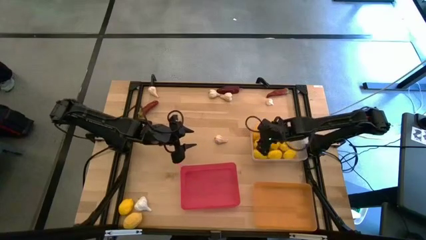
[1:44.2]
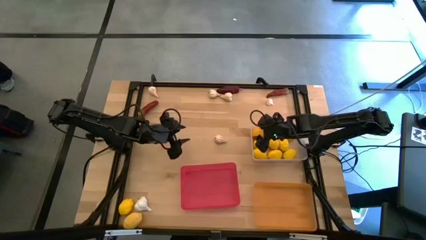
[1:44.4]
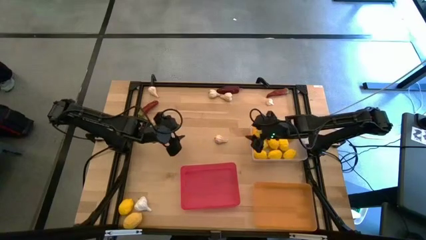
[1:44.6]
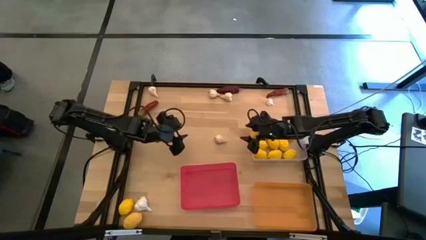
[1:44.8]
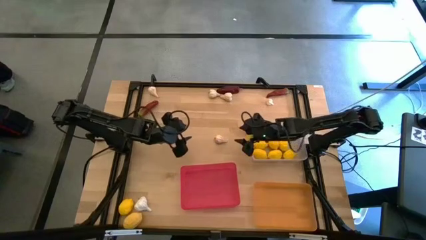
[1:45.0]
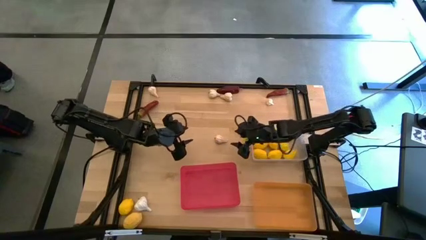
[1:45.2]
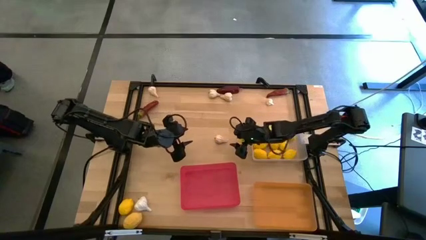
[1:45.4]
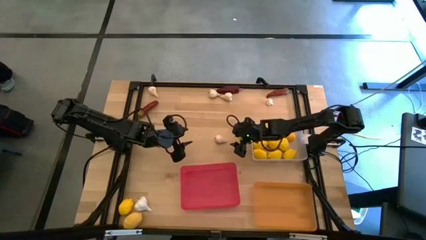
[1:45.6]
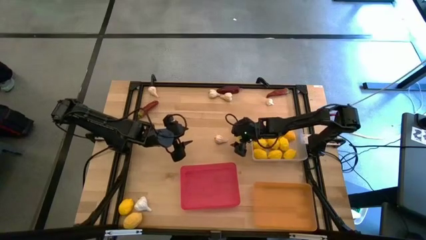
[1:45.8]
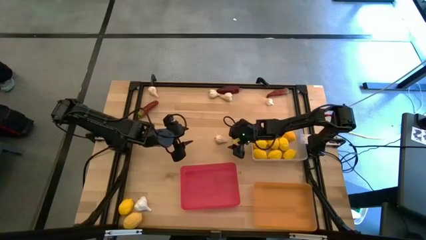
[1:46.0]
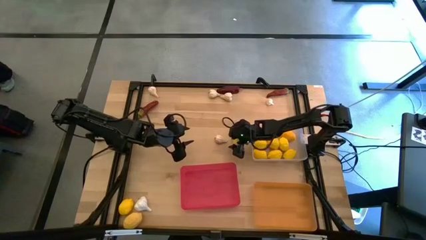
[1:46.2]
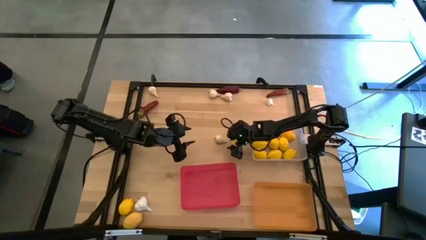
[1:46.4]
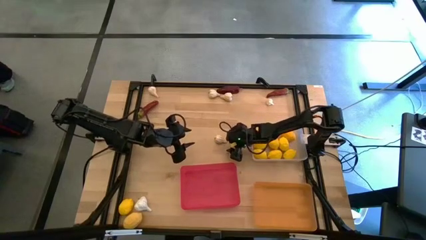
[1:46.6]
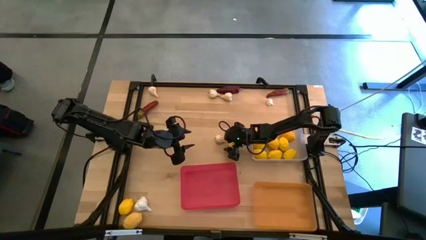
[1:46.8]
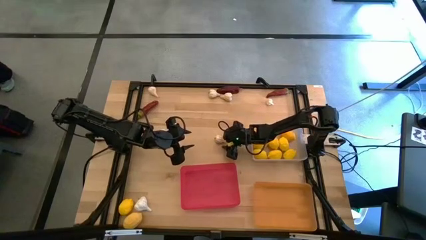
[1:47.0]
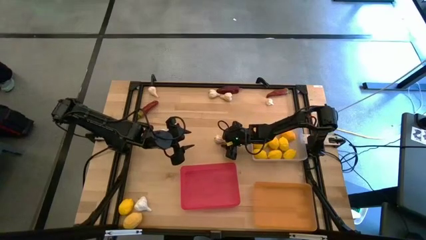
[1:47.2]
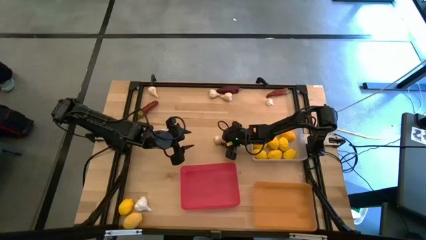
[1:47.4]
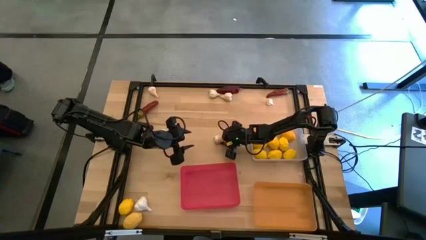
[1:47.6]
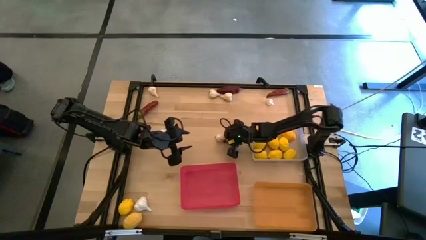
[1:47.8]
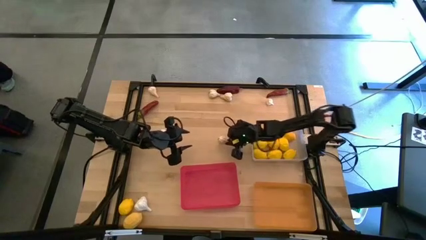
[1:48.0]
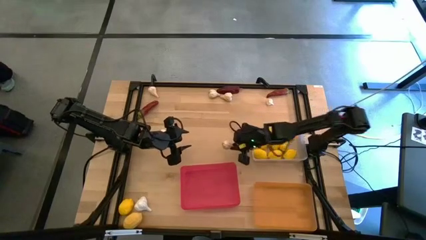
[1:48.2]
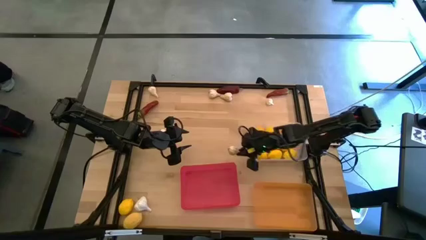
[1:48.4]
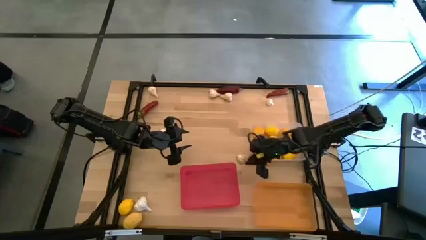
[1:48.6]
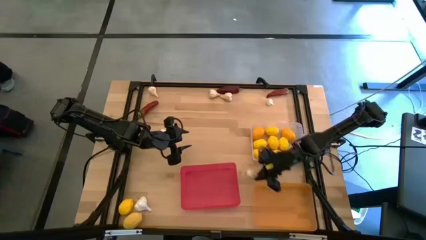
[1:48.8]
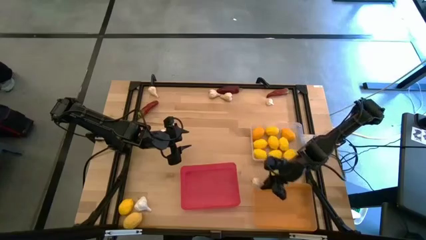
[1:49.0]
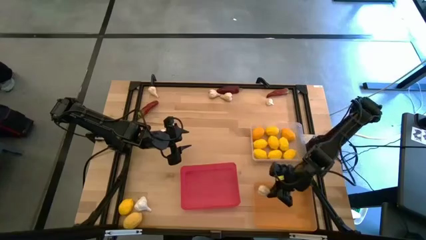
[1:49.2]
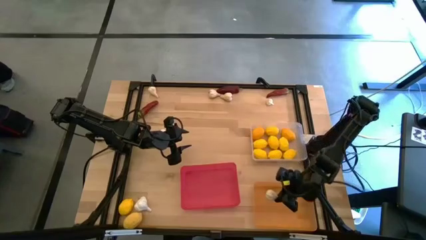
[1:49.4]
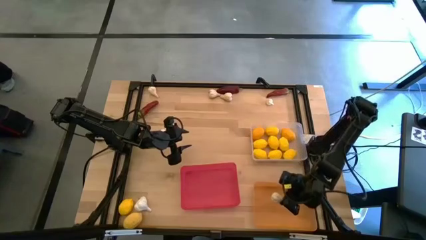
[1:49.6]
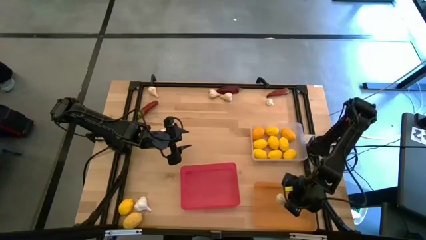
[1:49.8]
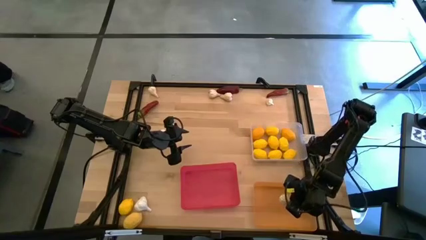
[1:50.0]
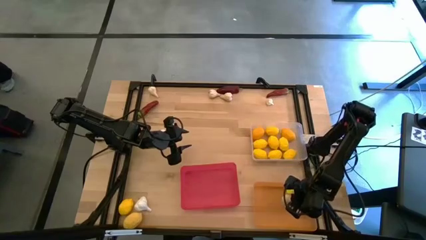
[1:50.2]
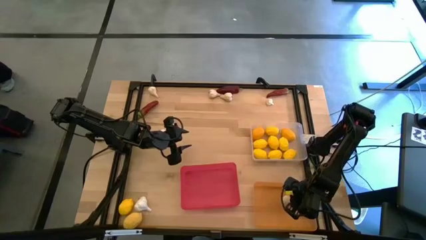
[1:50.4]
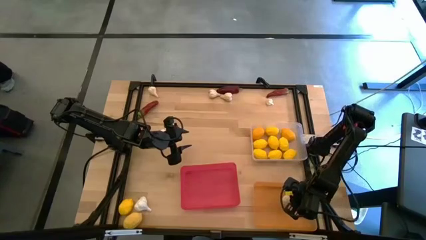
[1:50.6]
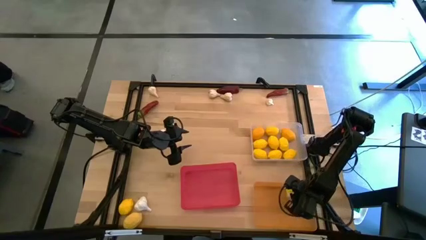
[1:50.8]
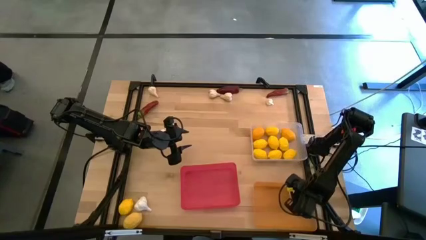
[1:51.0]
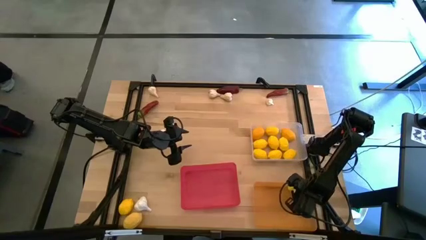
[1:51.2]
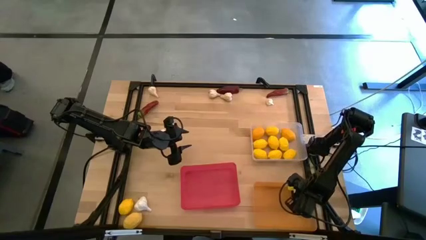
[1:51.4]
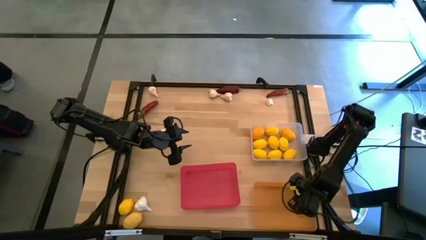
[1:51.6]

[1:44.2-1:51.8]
Task: Sort produce into baskets
Put the white garlic into the orange bin

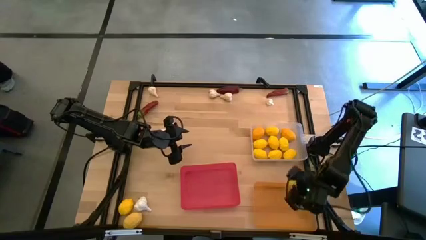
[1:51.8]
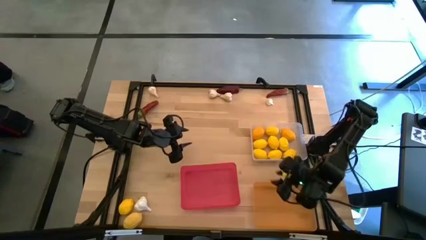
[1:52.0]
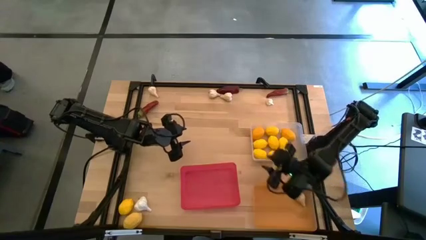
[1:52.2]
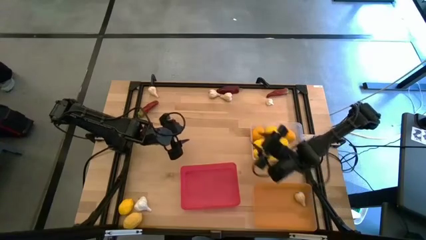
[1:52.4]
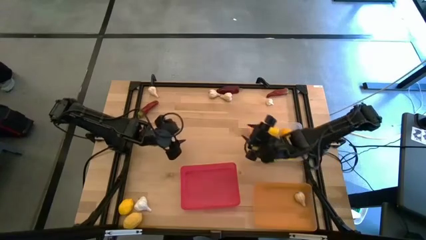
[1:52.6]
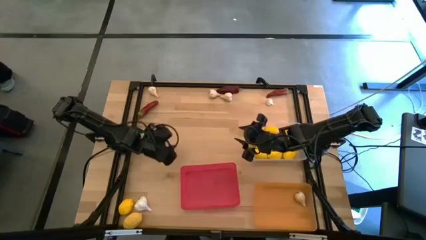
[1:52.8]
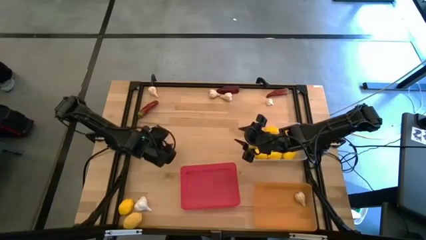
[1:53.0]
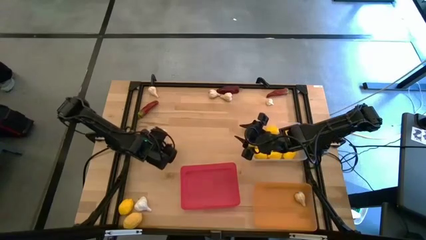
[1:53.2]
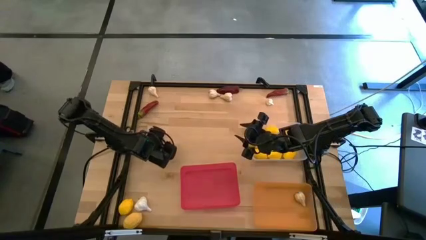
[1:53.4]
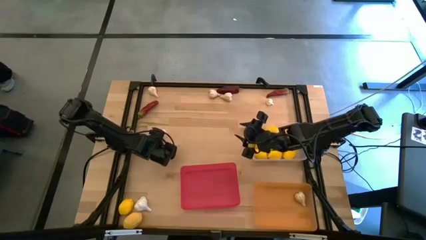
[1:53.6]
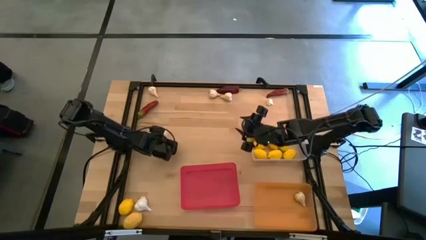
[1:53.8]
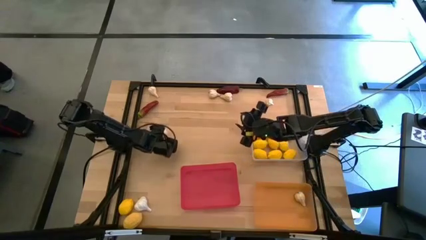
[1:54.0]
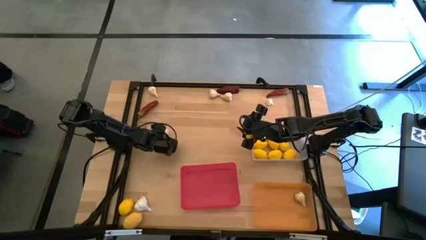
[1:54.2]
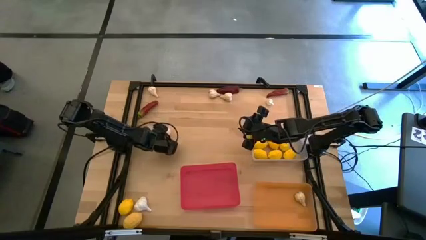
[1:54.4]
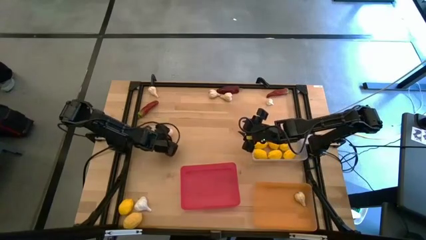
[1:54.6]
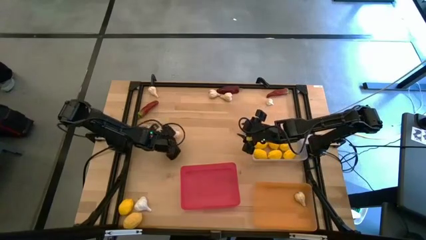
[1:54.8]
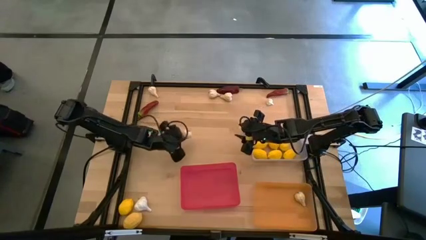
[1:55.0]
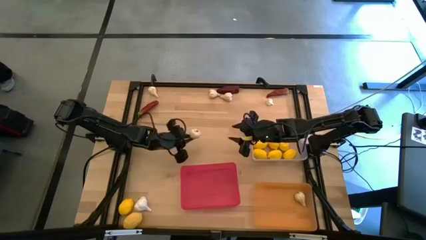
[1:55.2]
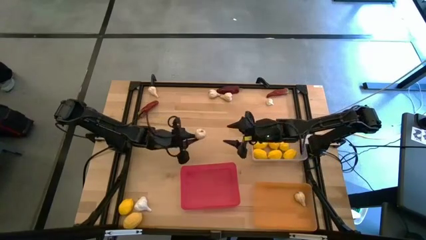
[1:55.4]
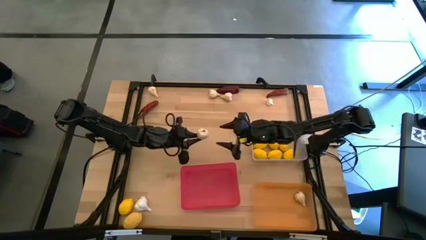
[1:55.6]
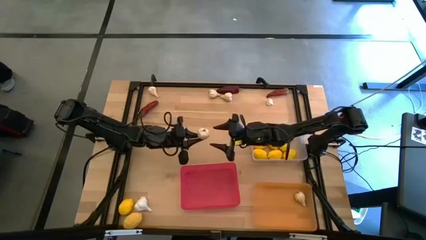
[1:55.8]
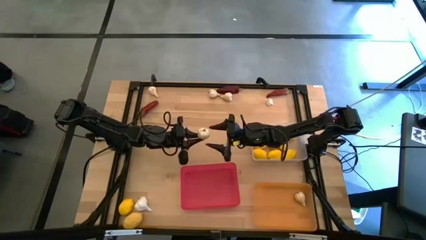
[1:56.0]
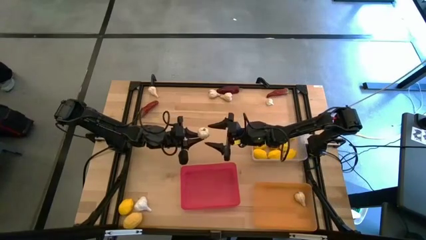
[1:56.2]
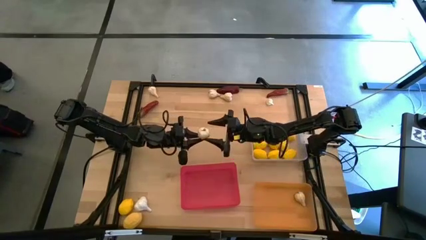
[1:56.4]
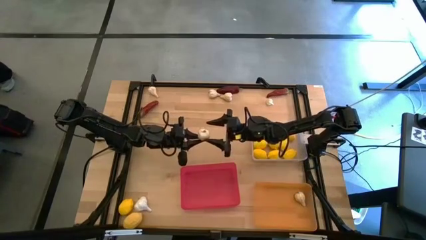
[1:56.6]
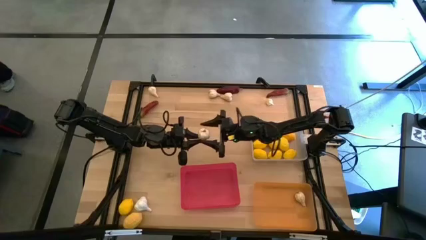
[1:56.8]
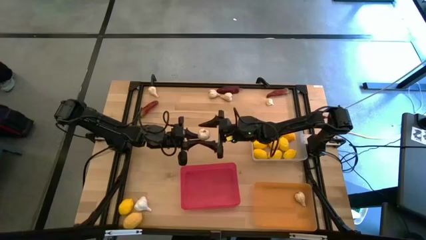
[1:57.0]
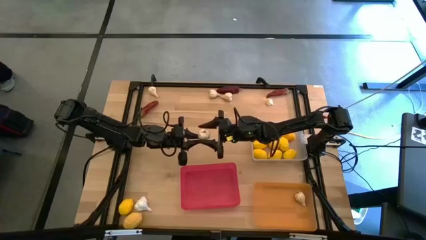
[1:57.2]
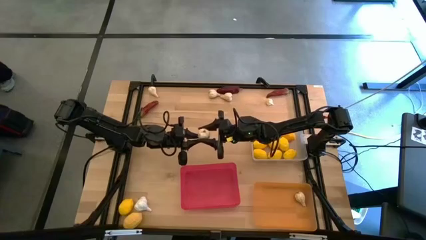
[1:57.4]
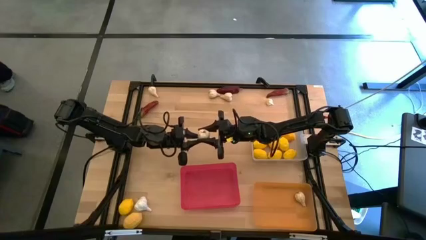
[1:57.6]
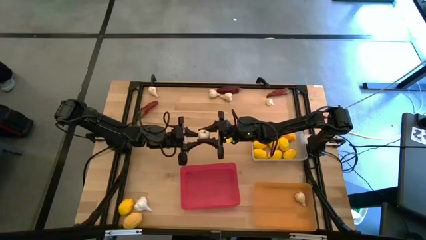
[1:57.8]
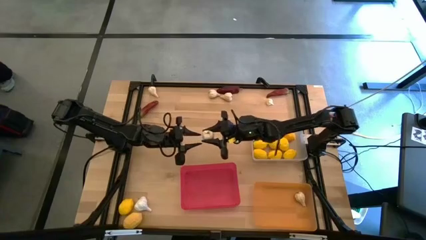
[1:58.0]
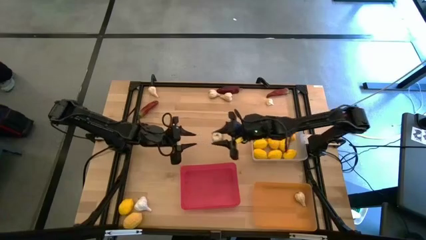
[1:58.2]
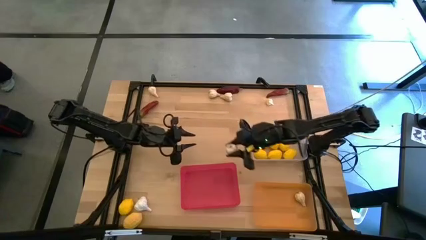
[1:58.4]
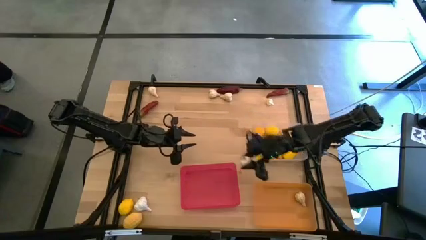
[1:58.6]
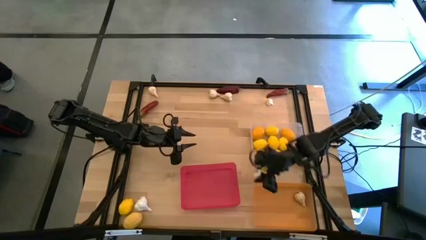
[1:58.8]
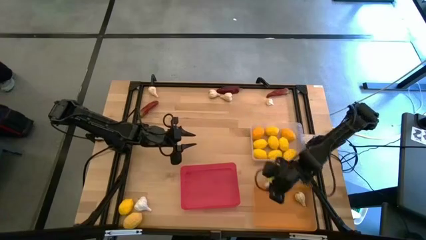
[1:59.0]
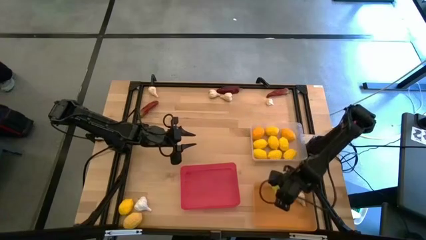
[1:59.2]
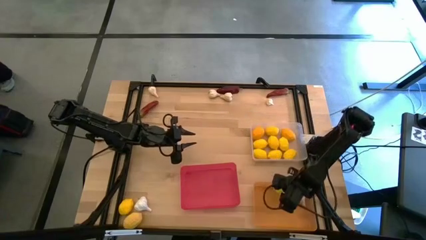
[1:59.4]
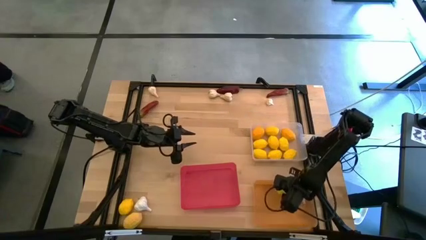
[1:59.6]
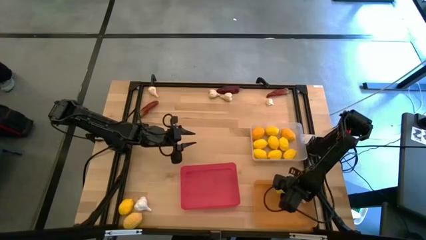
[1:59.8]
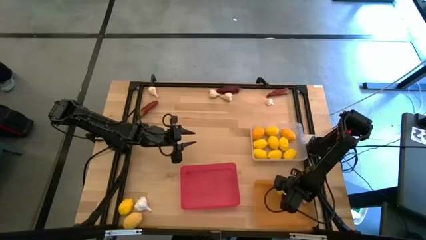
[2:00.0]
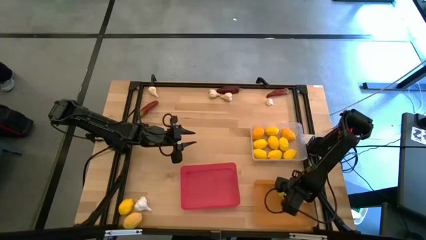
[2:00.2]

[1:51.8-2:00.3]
Put the white garlic into the orange bin

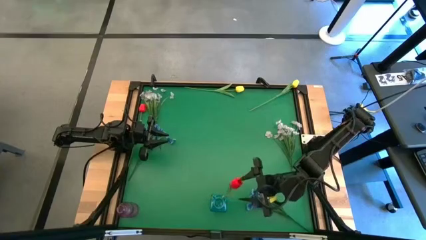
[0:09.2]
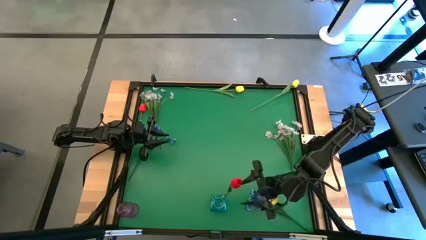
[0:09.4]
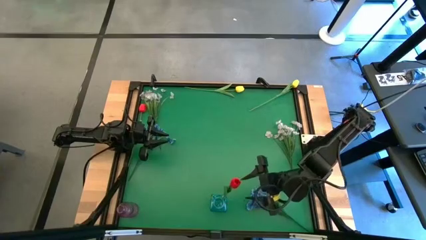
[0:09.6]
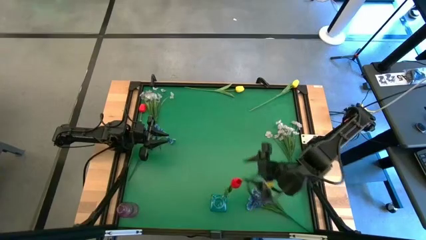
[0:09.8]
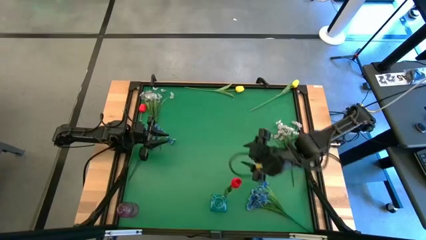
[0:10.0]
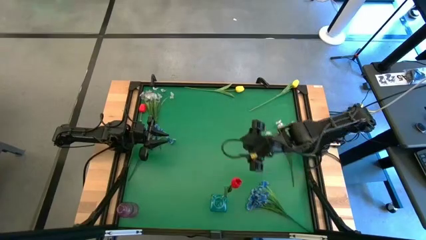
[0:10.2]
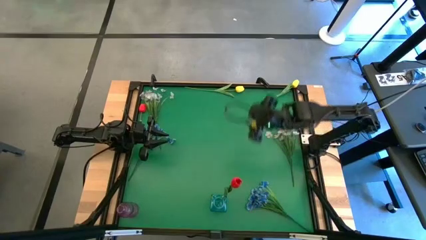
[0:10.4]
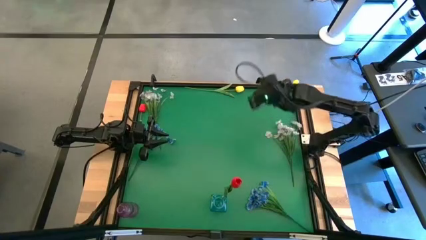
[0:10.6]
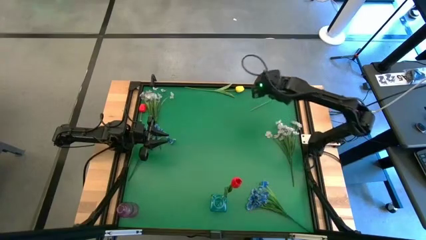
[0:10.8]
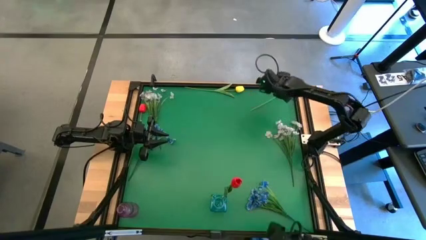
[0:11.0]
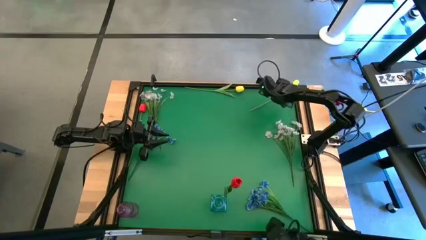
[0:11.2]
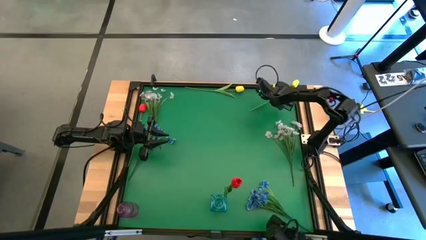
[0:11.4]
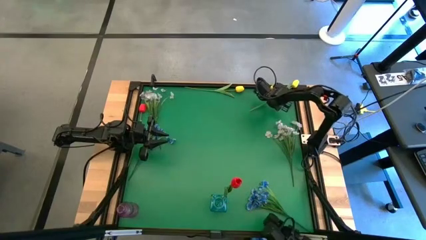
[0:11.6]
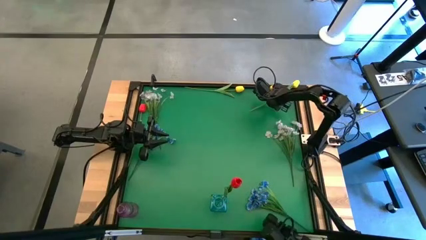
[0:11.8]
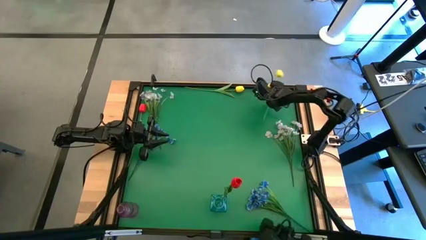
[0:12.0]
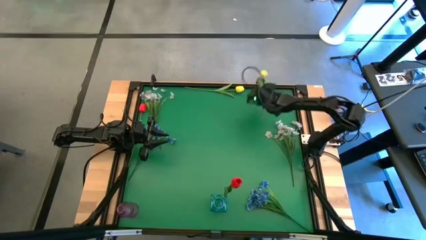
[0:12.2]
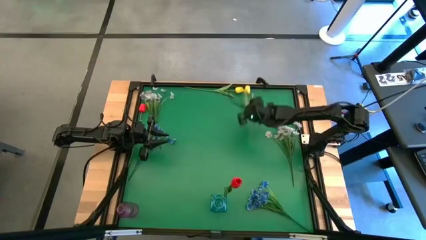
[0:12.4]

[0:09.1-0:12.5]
Task: Sort flowers into vase by color
Put the right yellow tulip into the blue vase
